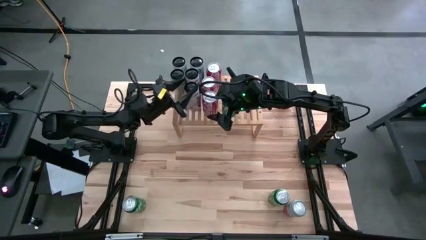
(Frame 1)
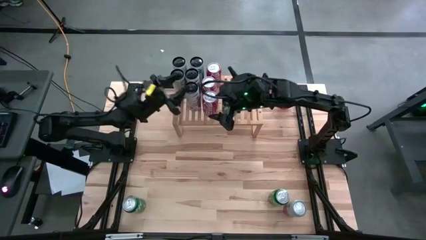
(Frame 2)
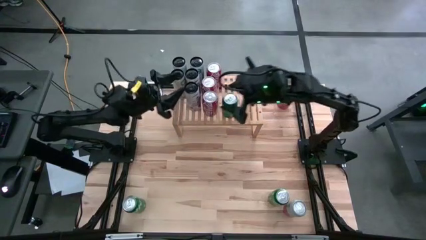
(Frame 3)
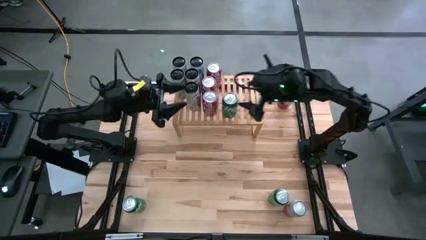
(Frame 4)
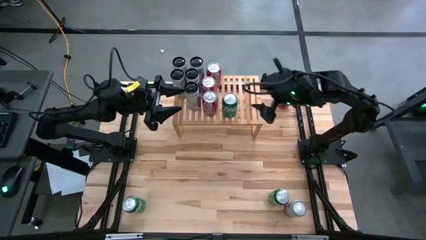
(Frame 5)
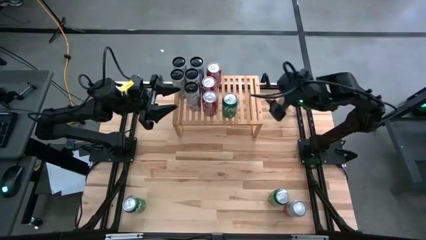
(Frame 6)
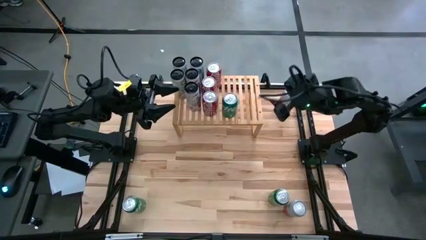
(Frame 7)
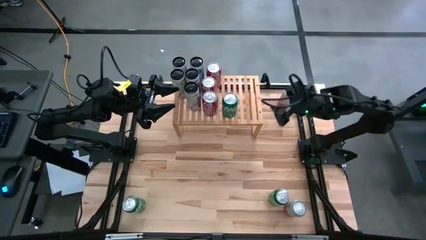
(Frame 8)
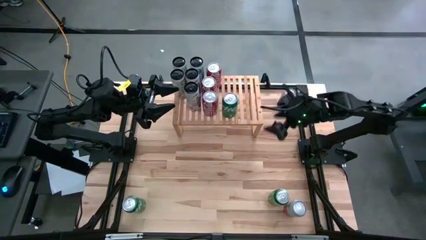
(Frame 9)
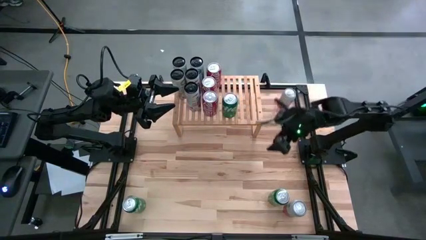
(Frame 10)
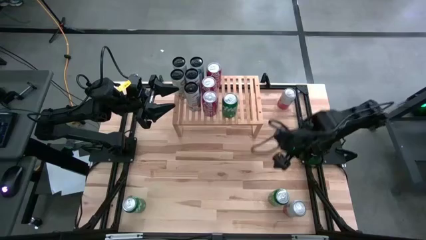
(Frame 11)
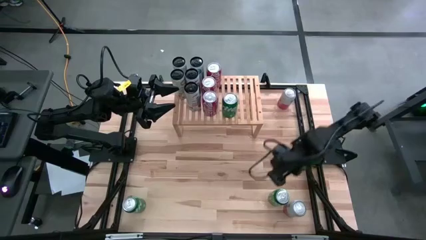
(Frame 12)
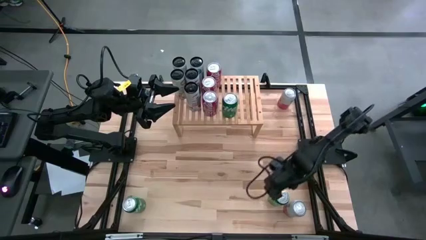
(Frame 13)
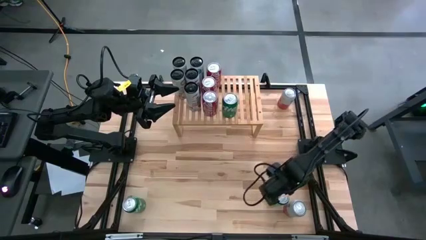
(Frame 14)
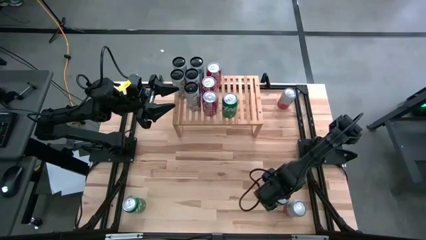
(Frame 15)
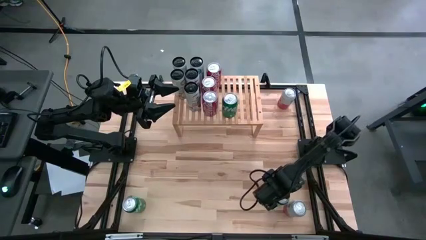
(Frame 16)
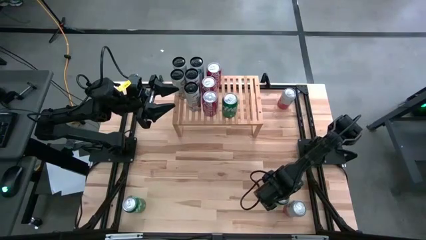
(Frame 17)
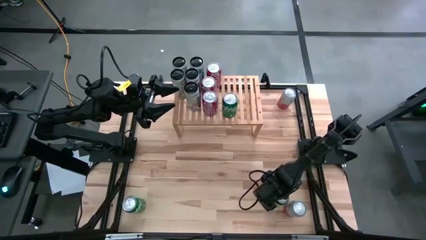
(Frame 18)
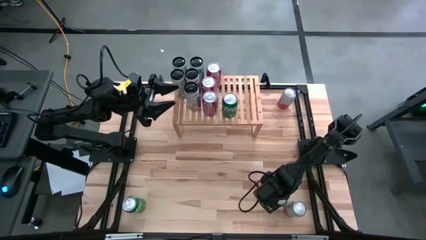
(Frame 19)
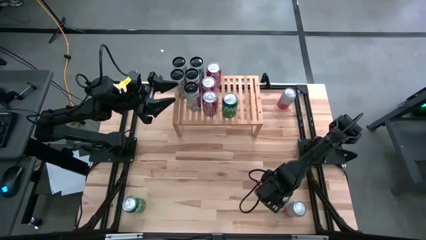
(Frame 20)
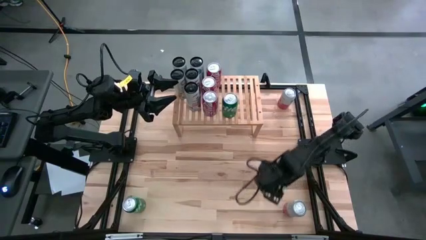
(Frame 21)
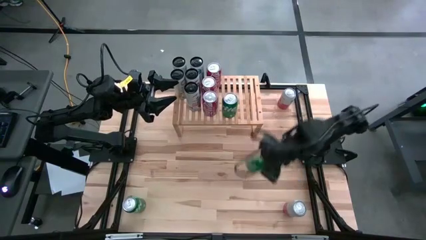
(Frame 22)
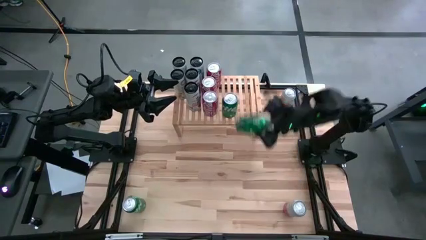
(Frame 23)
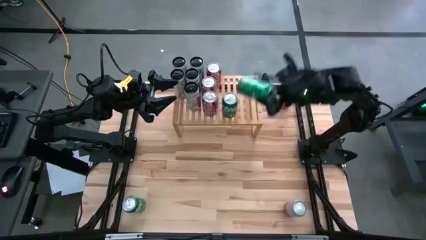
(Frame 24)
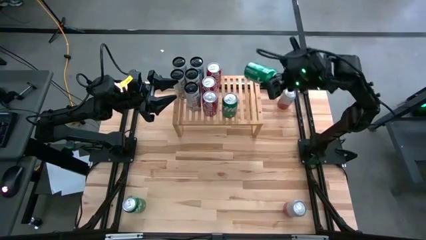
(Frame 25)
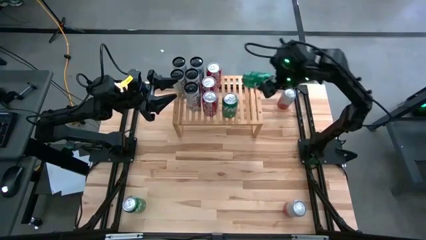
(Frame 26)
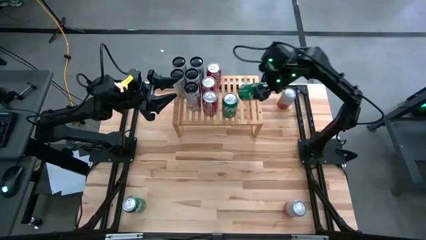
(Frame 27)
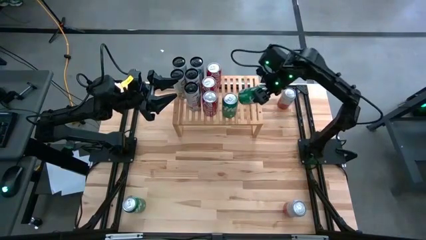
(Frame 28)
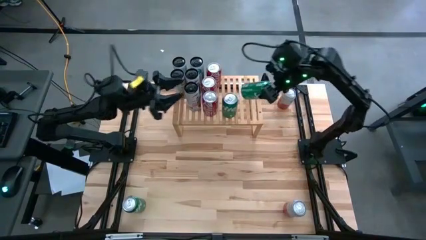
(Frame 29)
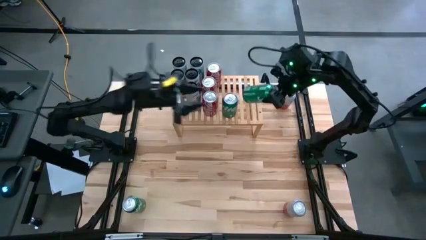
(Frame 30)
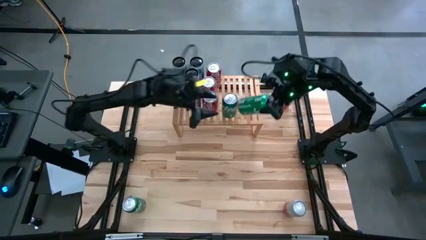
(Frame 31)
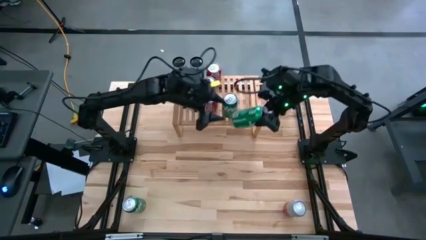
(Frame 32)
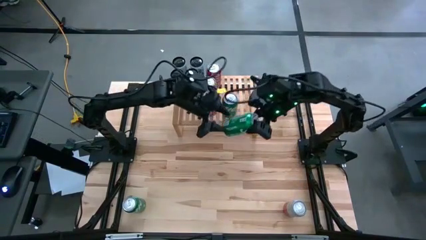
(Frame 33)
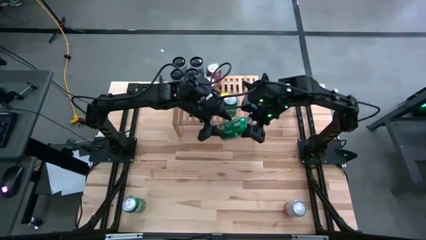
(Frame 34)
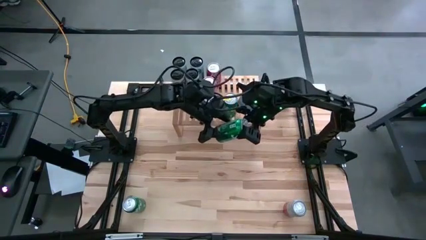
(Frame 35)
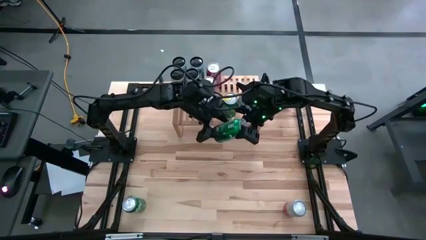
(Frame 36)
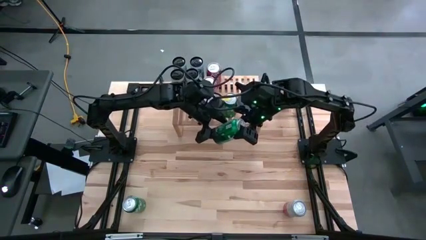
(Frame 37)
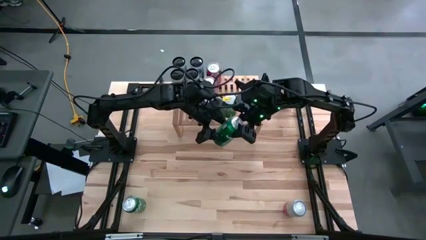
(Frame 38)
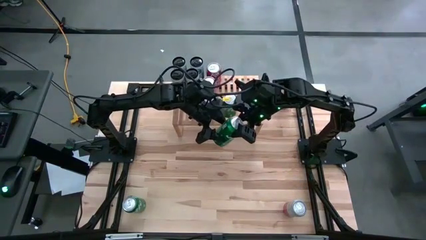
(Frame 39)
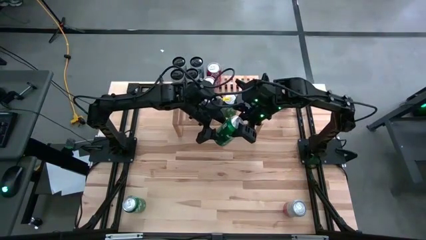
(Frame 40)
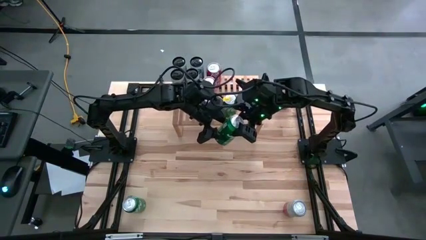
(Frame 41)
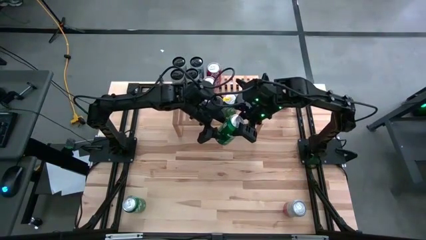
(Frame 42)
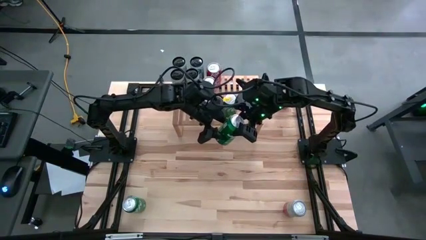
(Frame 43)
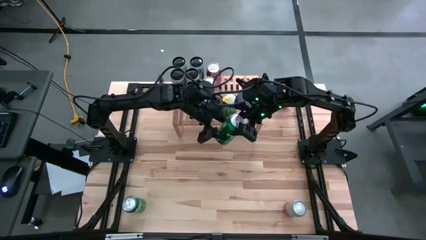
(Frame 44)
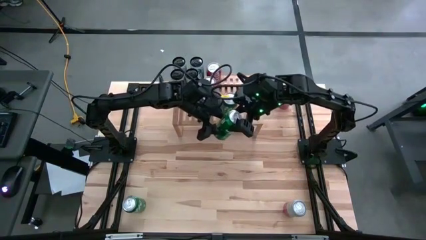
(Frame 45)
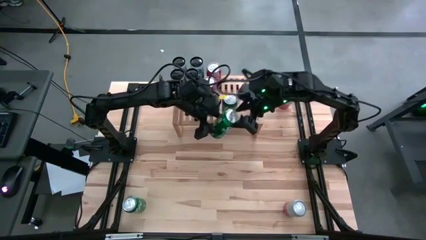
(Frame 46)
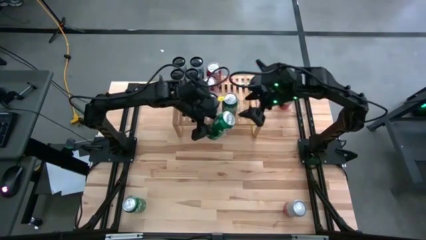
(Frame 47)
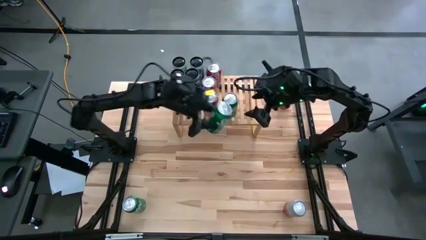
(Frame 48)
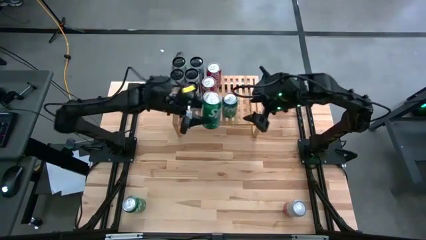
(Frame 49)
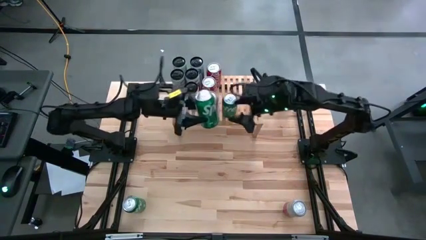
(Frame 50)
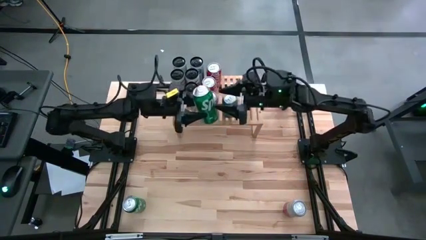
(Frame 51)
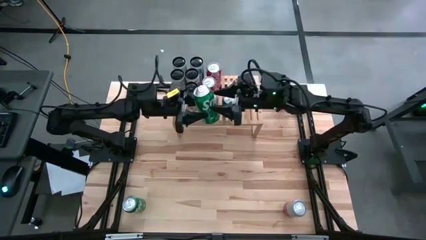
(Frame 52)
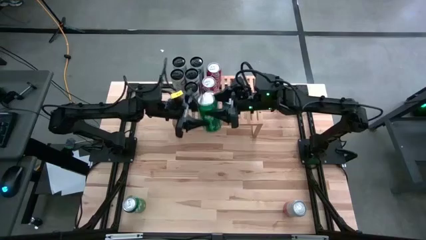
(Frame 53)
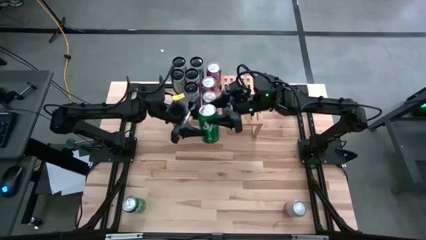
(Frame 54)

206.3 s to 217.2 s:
Task: Place canned beverage on shelf
Put the right green soda can on the shelf aligned with other green soda can
